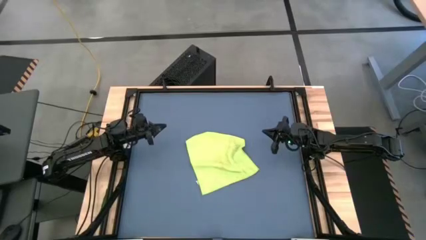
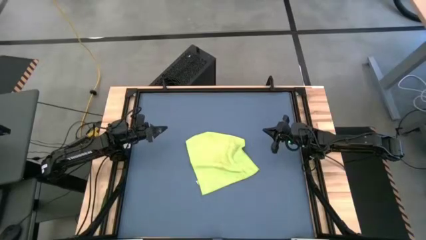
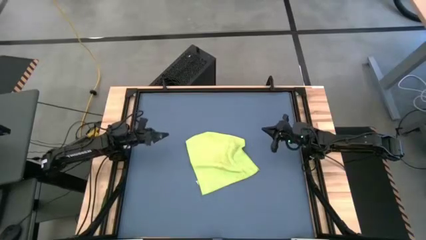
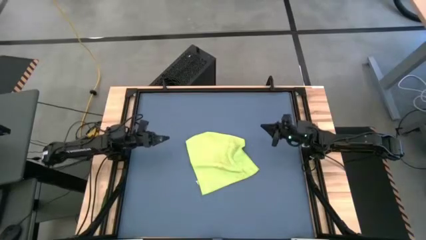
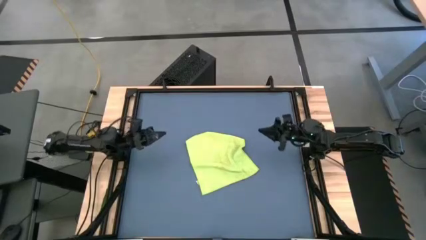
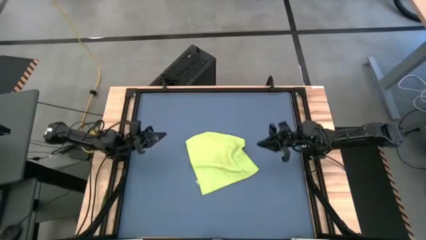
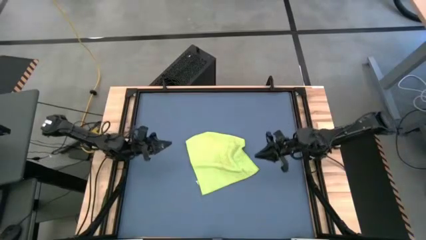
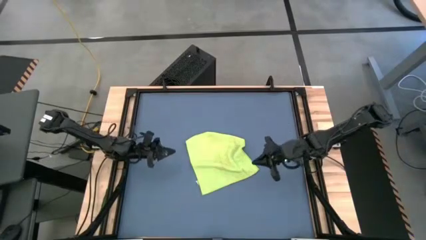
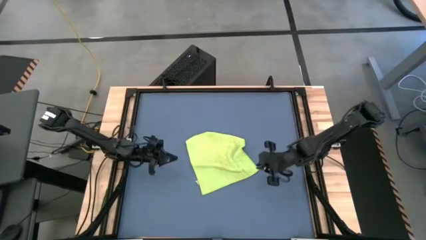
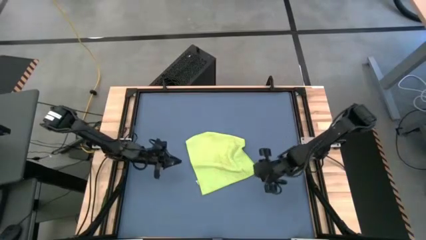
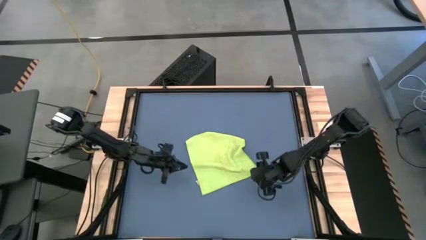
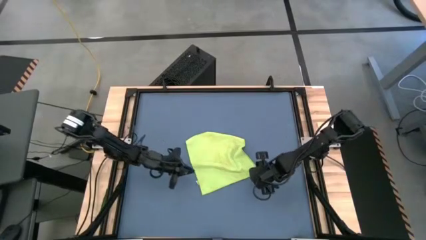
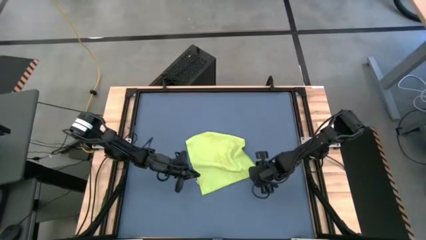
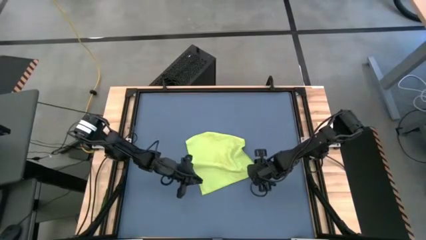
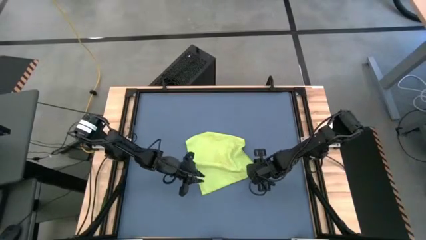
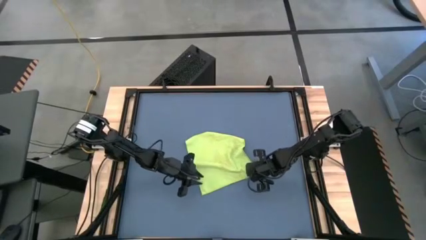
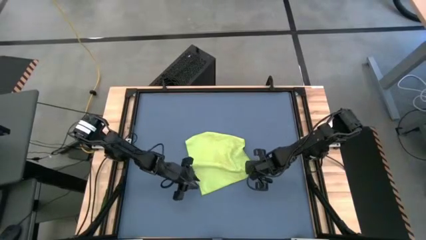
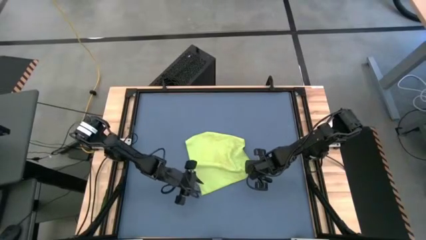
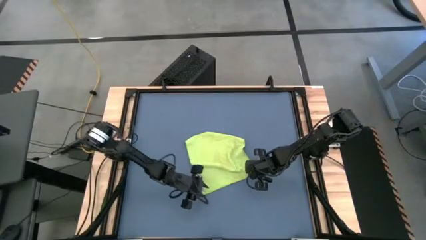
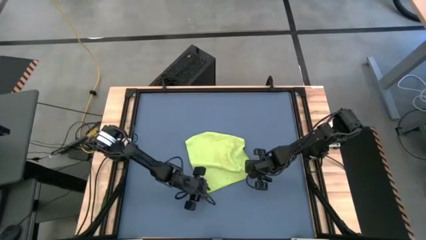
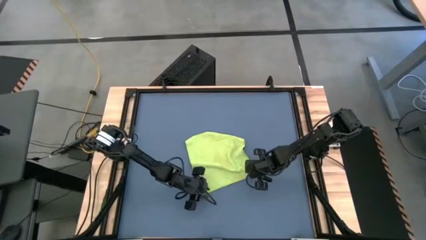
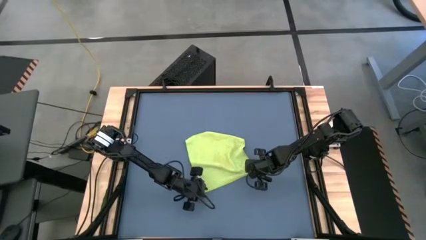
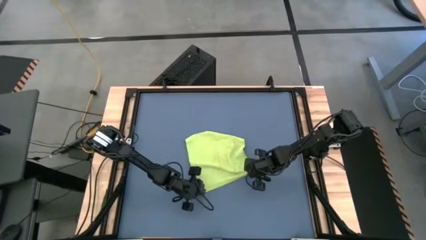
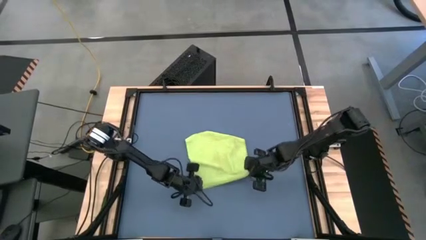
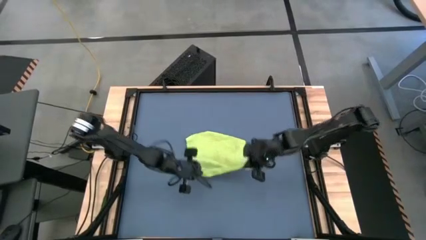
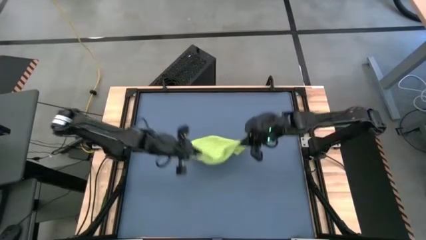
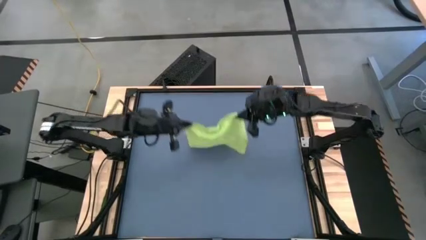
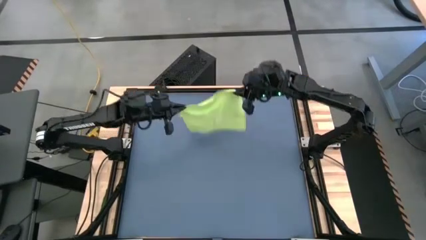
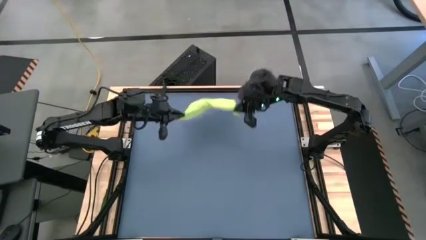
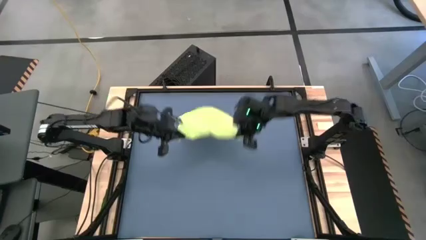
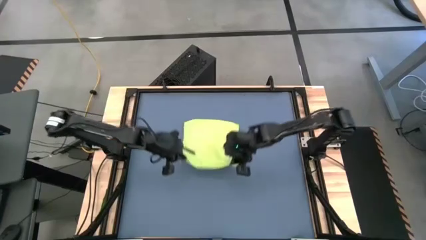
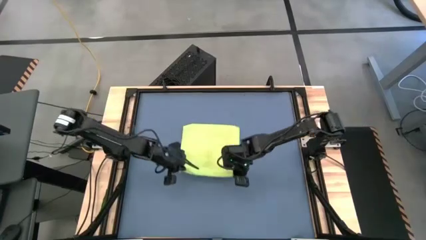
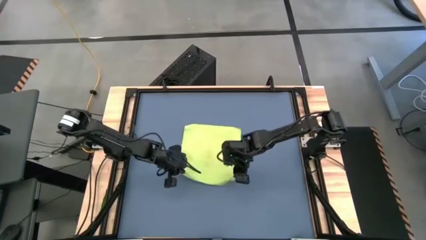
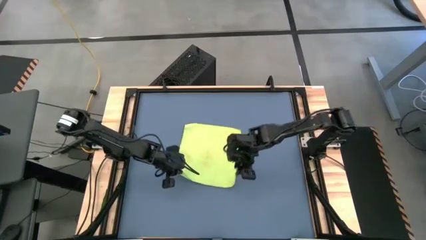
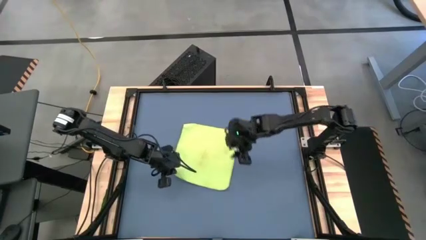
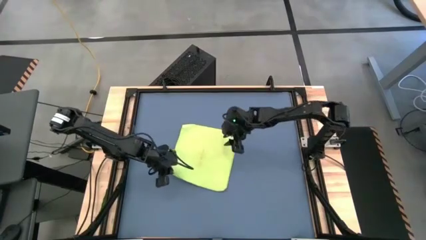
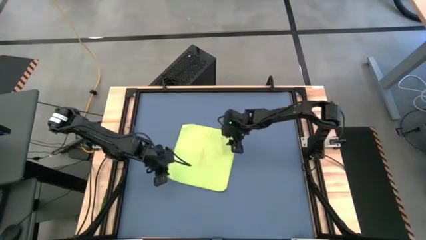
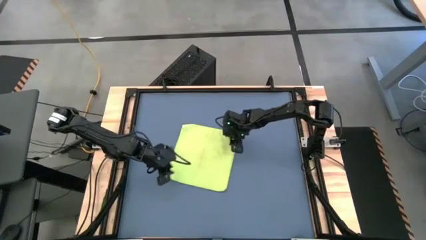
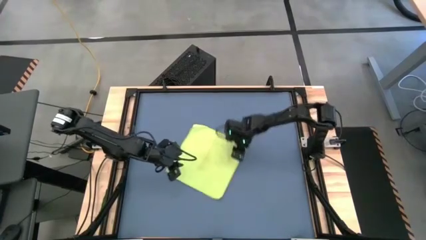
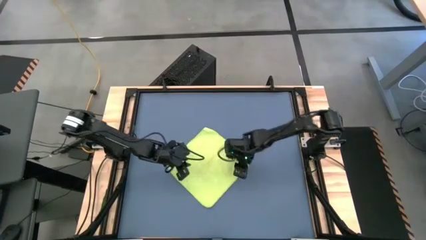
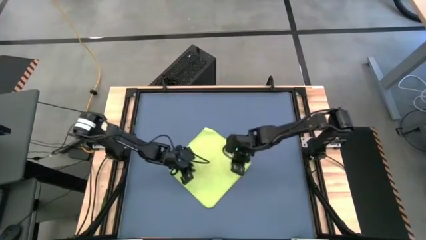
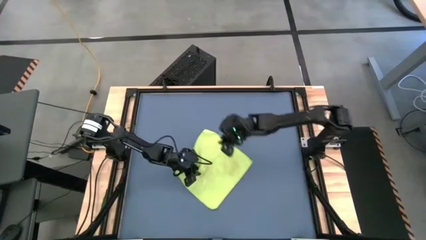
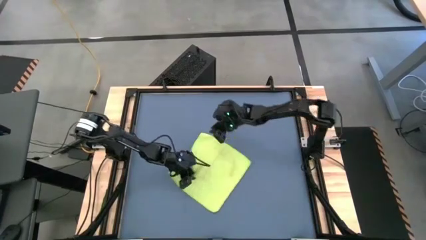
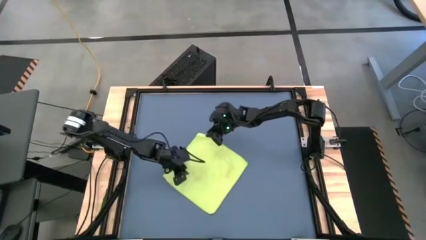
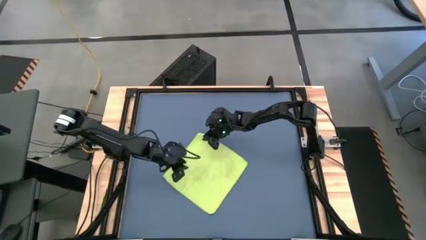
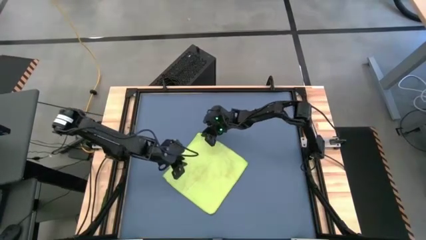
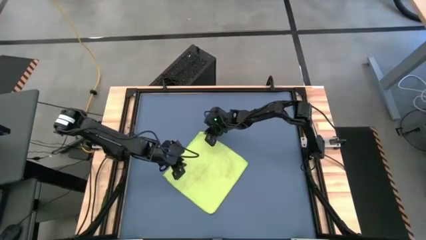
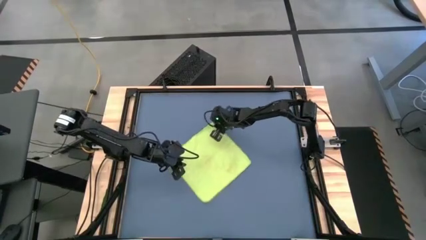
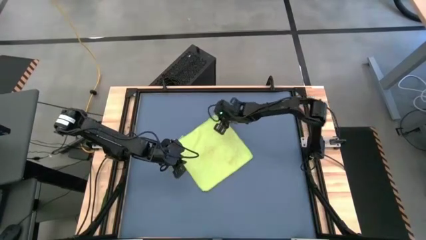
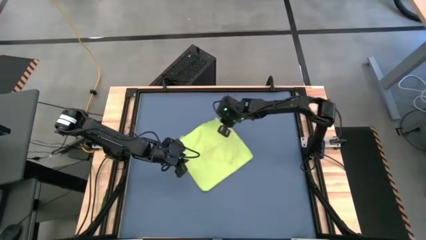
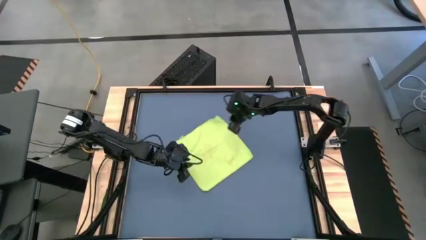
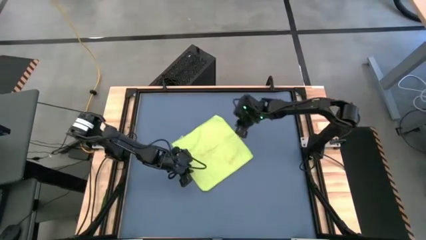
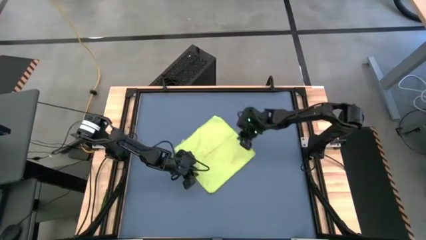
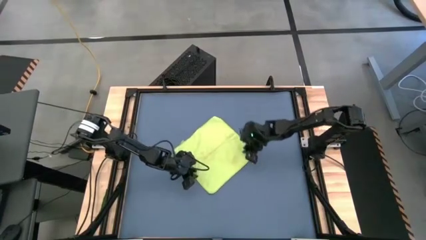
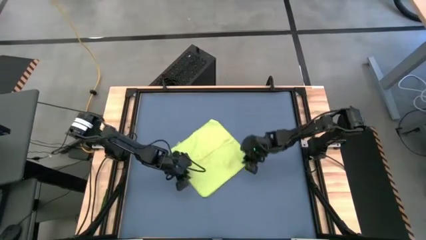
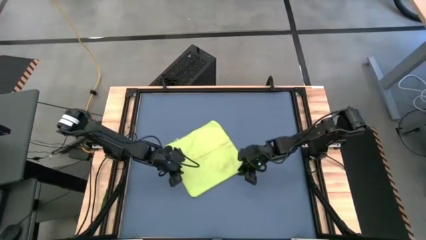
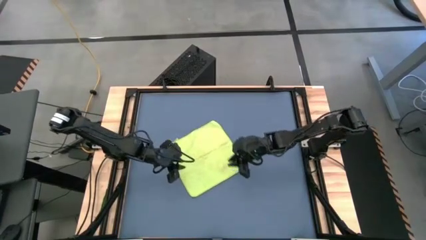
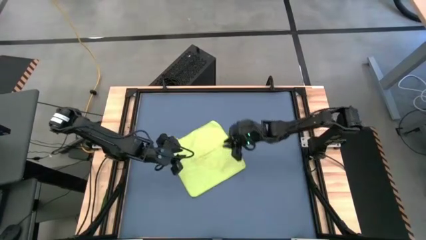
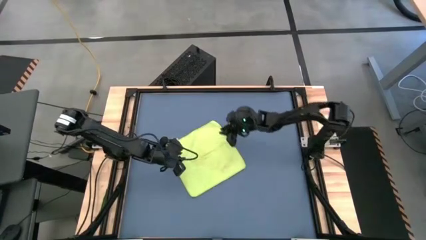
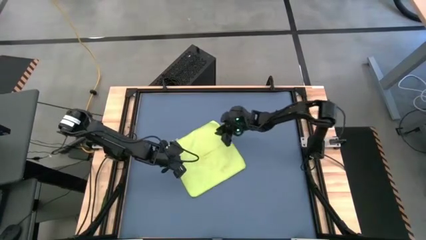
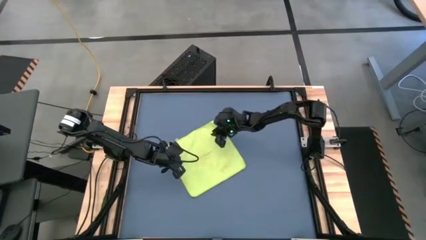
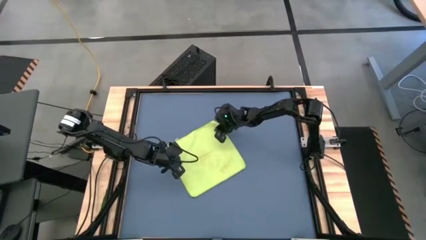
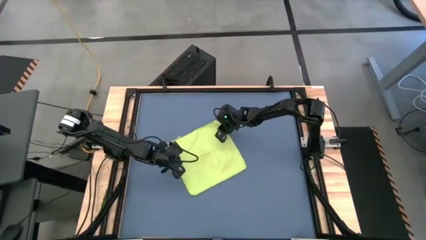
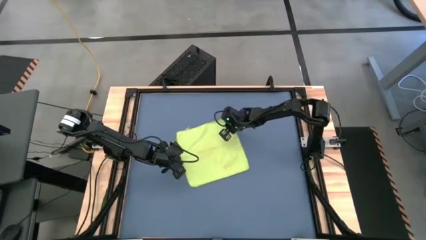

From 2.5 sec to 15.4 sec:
Task: Roll towel
Fold the green towel
